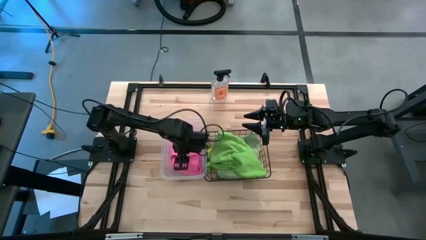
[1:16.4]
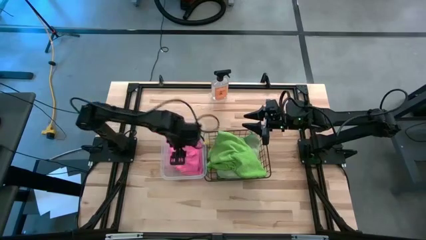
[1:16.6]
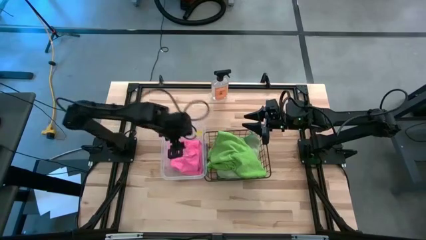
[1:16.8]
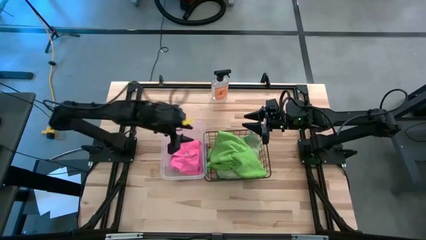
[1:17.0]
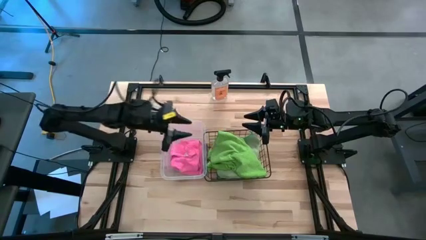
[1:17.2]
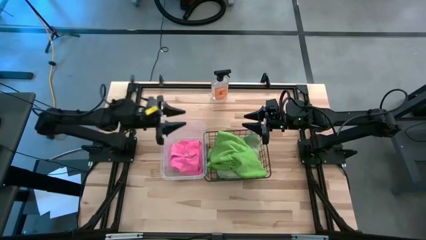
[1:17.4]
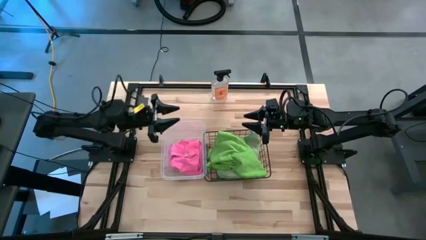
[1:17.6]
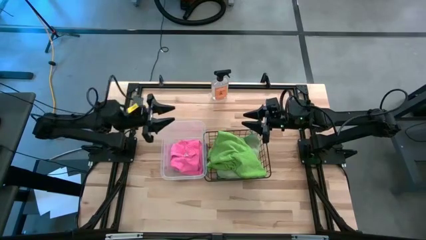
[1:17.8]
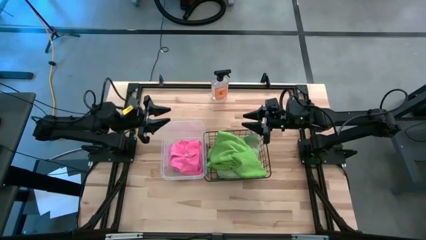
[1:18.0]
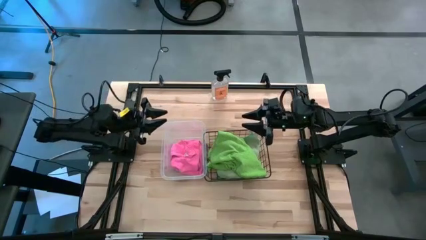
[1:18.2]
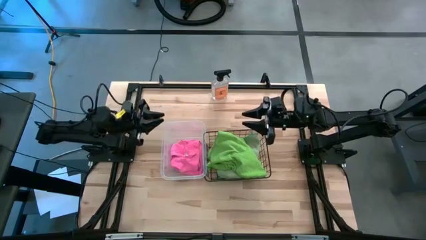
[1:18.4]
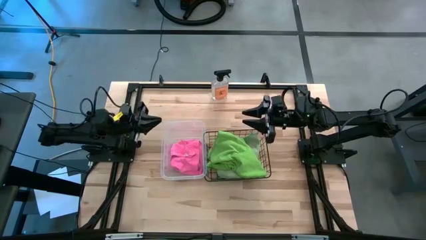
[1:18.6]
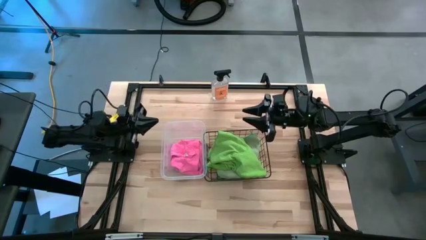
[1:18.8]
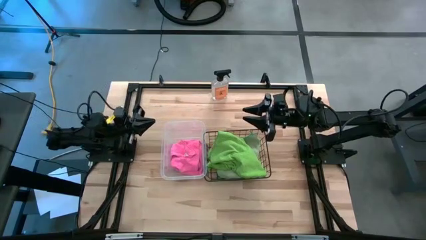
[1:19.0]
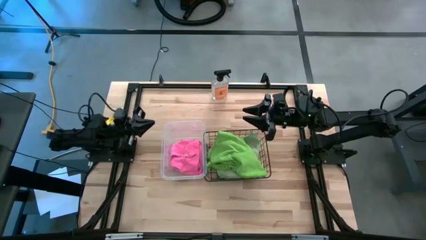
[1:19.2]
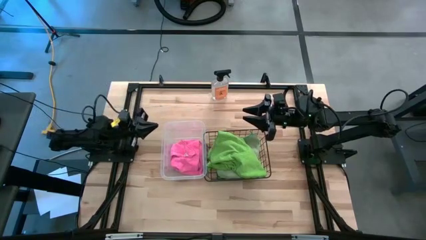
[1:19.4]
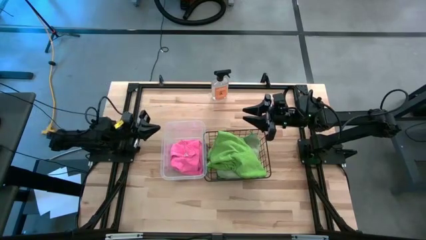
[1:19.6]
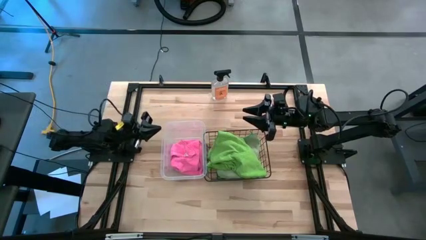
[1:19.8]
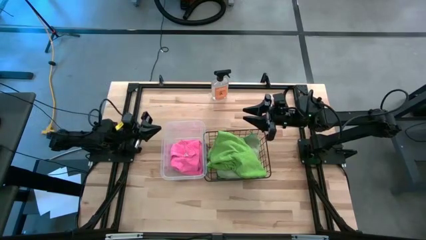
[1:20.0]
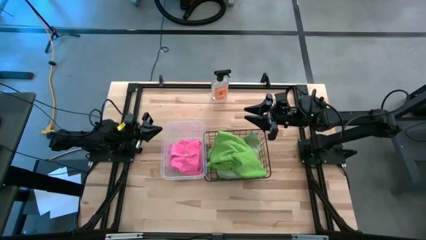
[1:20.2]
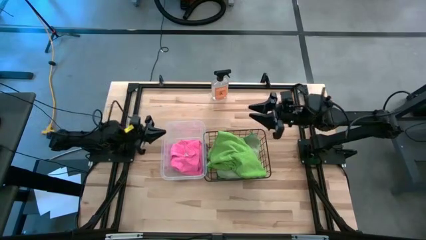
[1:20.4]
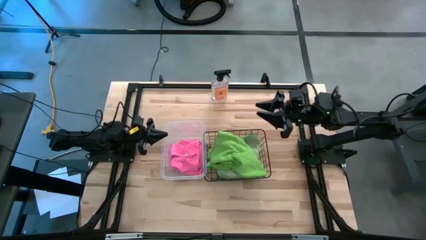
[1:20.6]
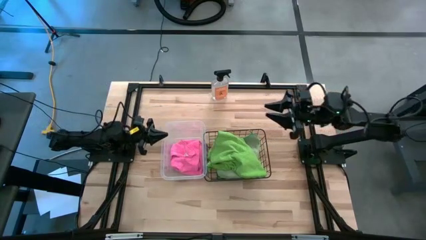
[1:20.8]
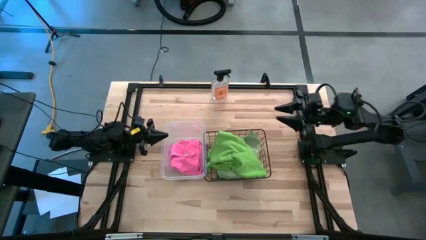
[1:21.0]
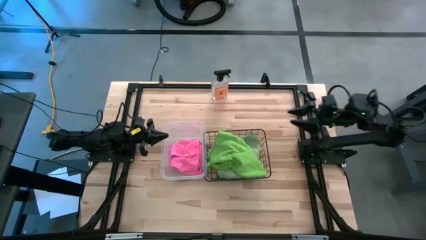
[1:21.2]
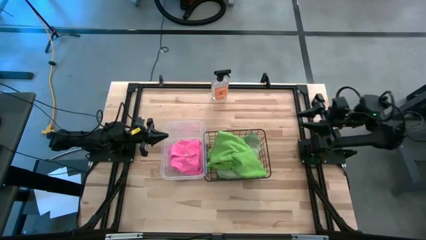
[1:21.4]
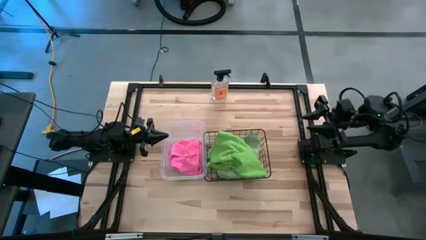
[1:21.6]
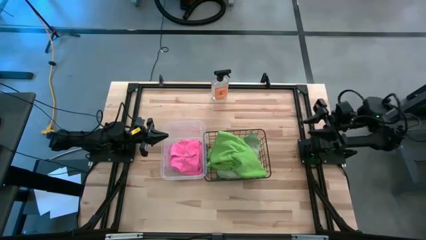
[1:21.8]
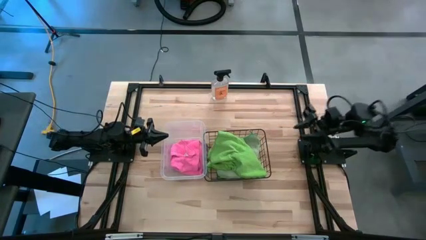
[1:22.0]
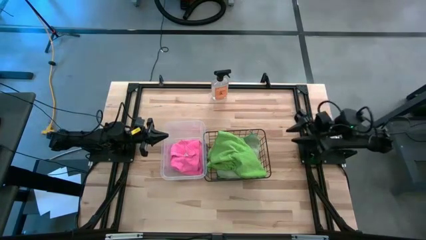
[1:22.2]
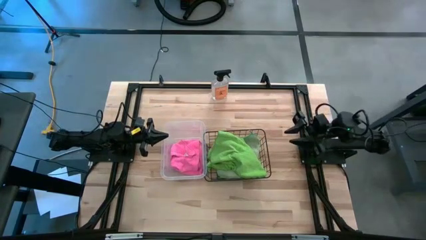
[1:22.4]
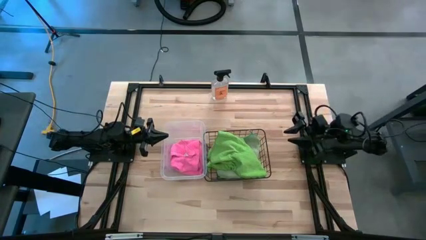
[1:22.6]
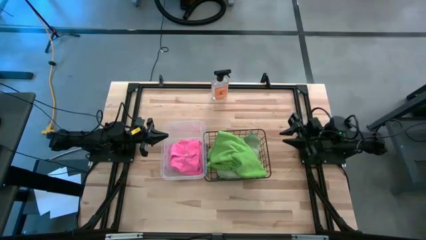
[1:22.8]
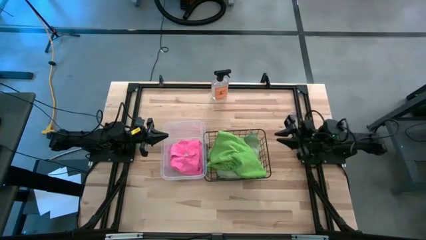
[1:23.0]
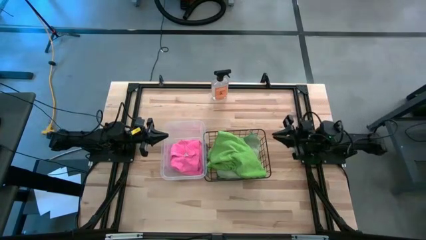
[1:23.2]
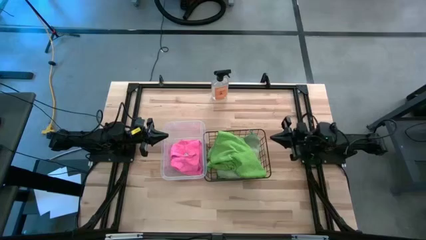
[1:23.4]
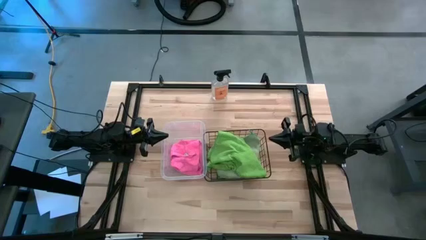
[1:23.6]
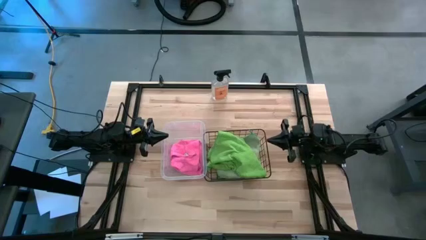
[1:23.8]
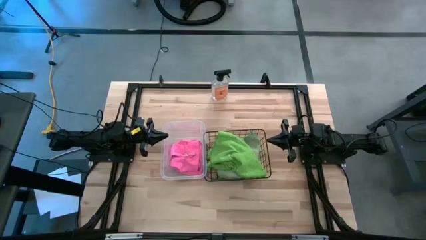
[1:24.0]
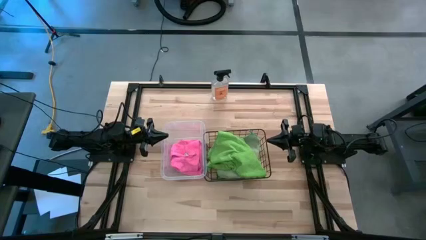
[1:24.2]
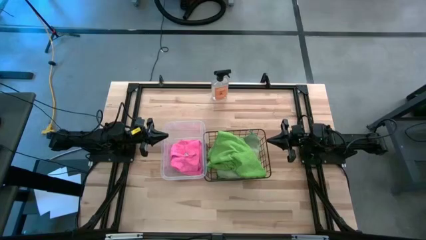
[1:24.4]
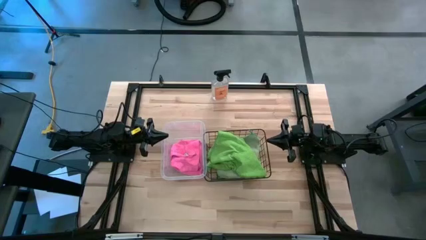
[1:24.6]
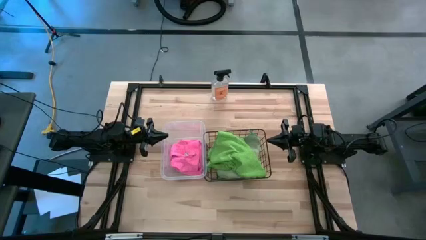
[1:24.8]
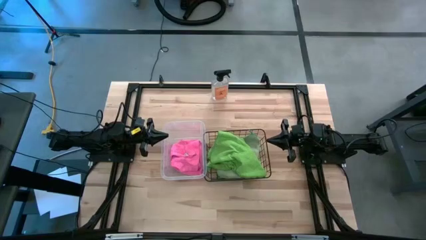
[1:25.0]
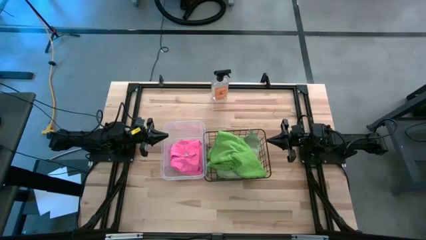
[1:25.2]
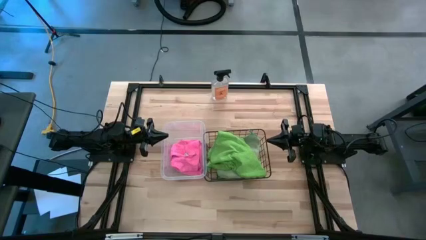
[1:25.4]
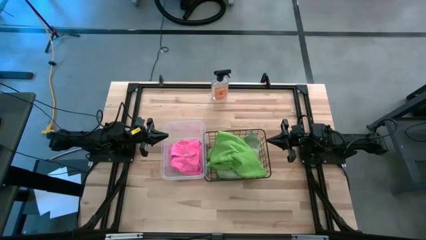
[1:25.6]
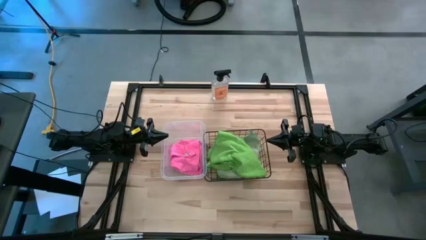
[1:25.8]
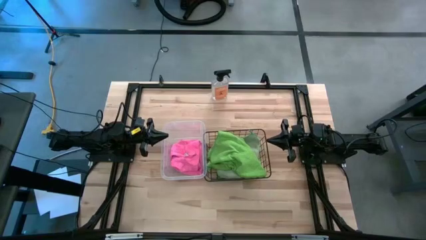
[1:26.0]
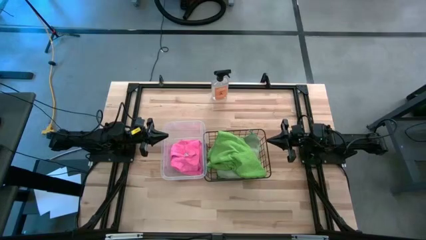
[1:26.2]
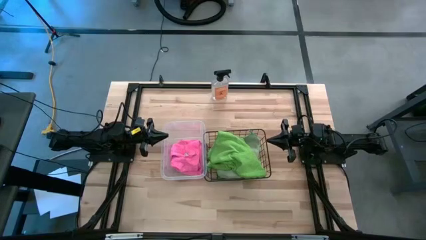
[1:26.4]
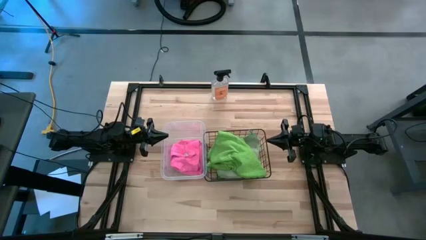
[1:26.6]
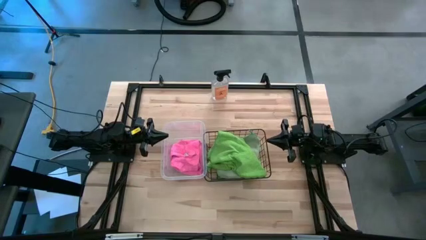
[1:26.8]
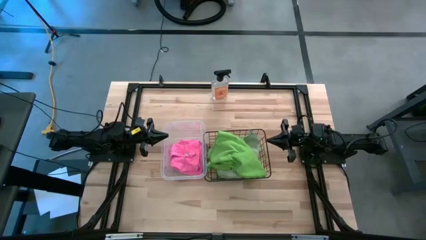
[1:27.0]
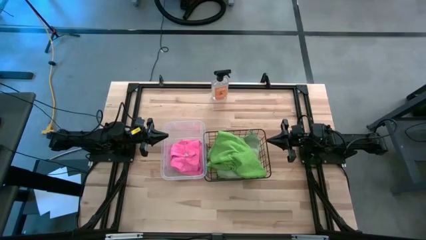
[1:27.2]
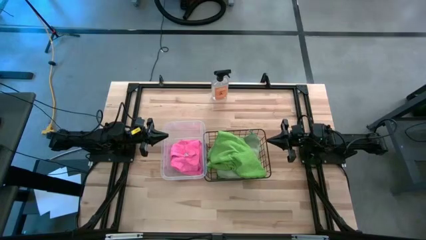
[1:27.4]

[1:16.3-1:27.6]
Task: Sort microfiber towel by color & place in baskets
Return to Home Position

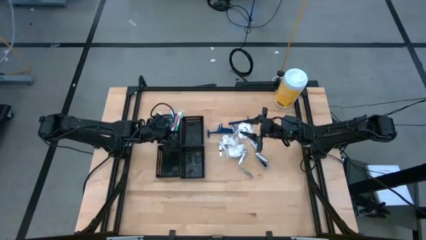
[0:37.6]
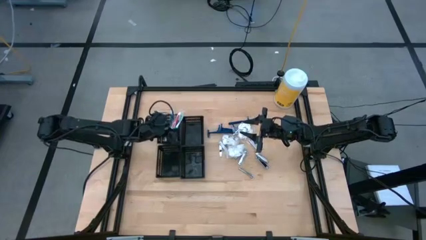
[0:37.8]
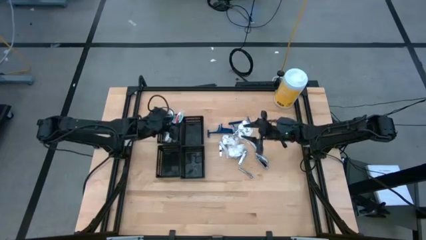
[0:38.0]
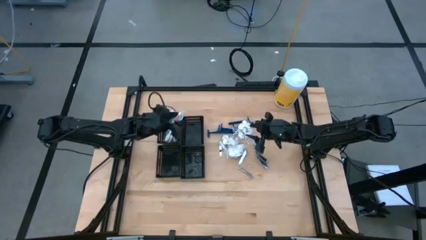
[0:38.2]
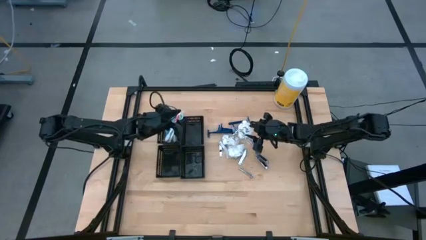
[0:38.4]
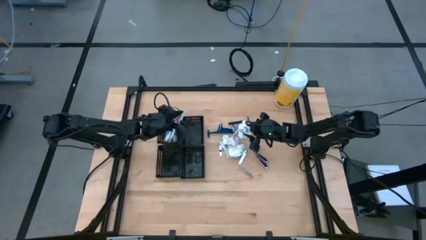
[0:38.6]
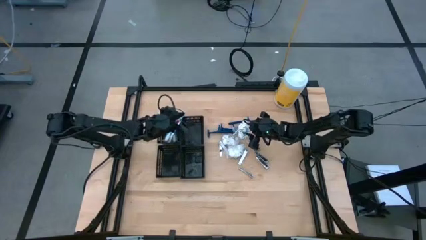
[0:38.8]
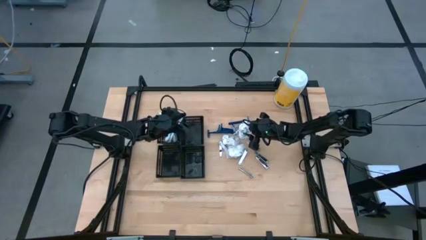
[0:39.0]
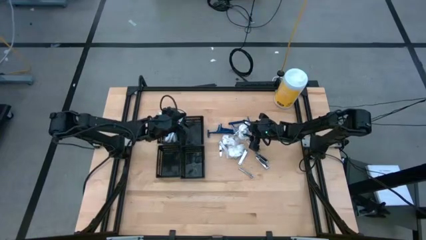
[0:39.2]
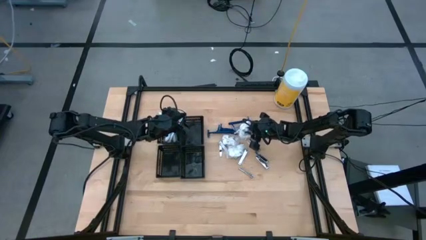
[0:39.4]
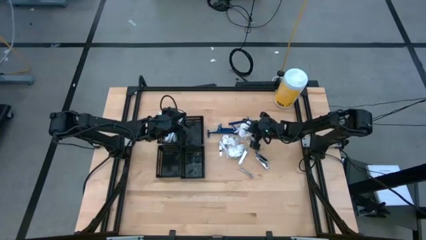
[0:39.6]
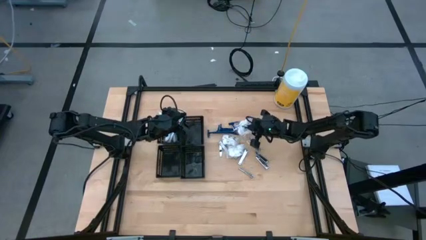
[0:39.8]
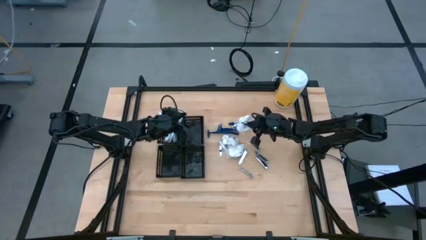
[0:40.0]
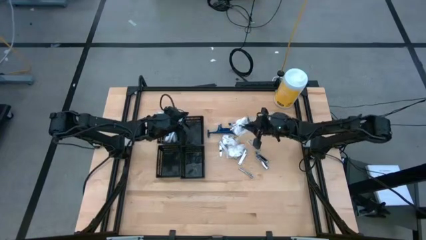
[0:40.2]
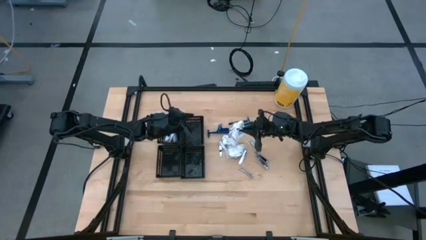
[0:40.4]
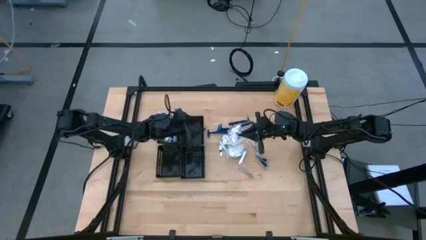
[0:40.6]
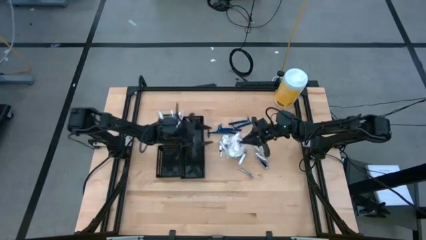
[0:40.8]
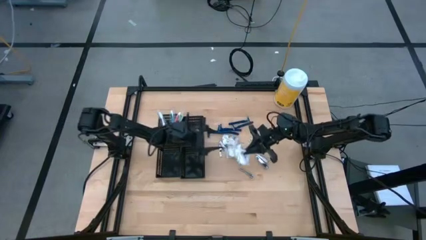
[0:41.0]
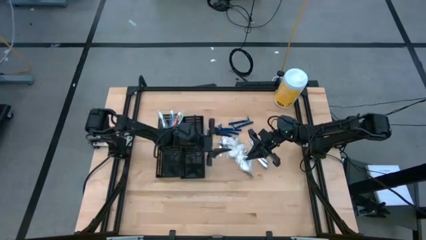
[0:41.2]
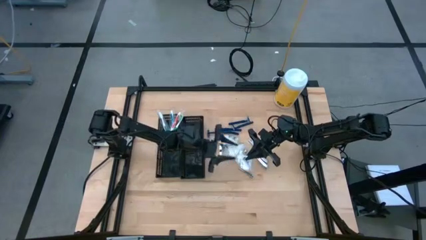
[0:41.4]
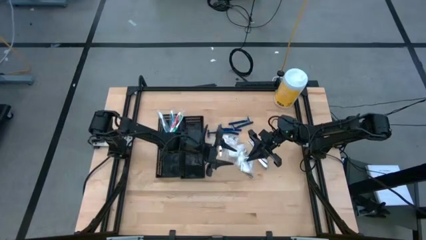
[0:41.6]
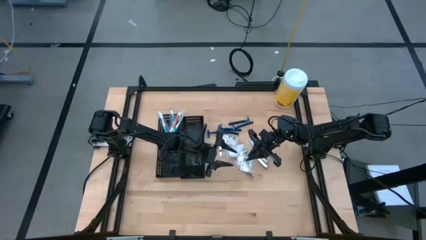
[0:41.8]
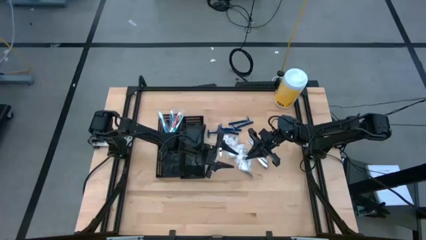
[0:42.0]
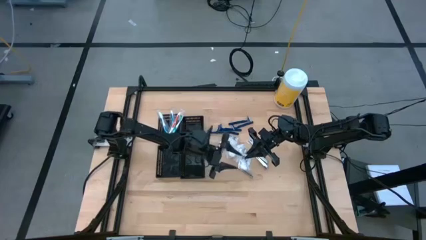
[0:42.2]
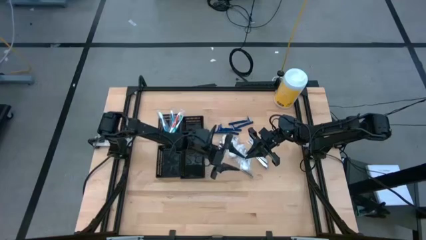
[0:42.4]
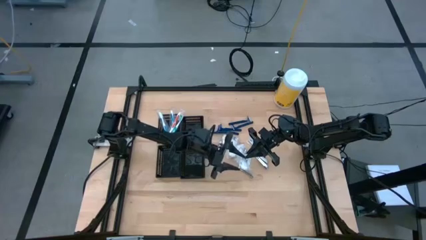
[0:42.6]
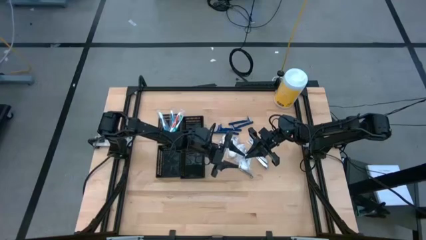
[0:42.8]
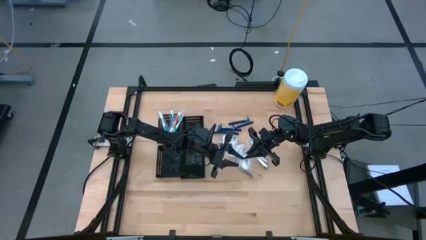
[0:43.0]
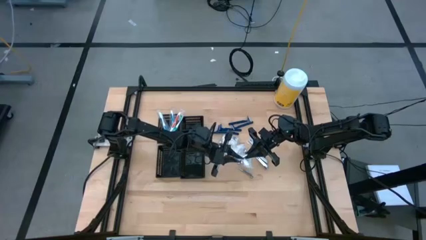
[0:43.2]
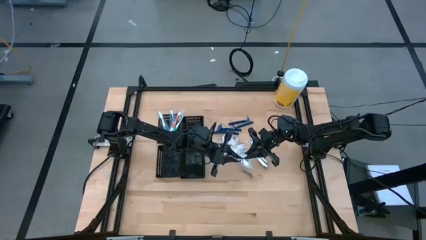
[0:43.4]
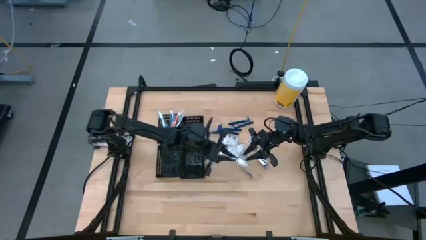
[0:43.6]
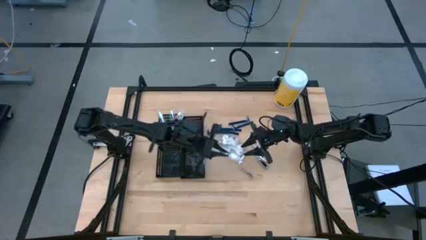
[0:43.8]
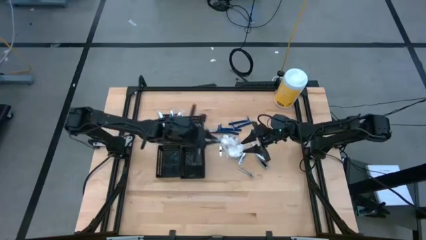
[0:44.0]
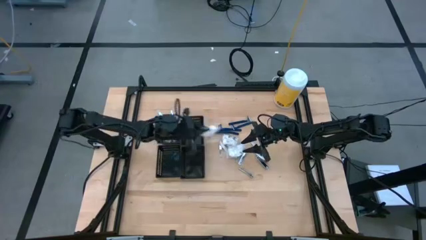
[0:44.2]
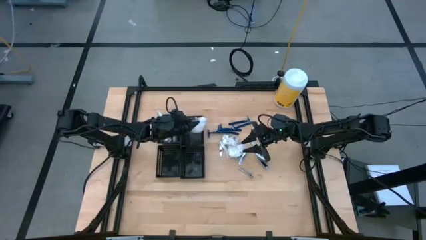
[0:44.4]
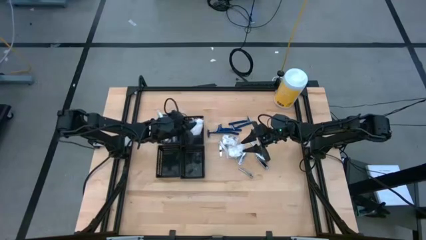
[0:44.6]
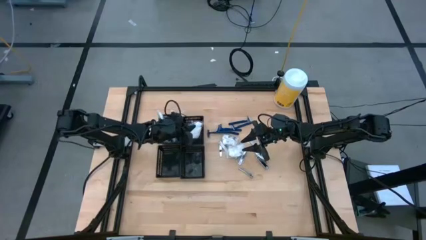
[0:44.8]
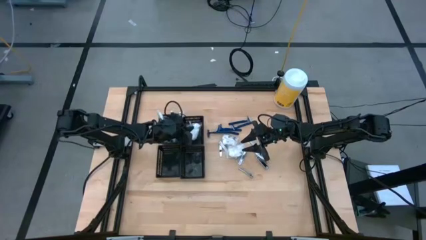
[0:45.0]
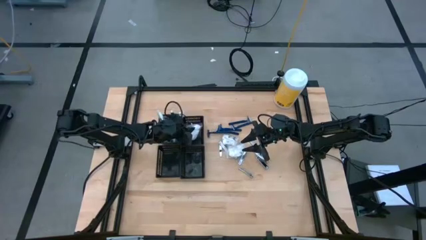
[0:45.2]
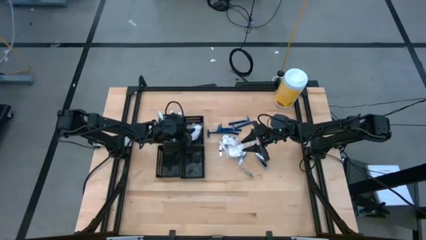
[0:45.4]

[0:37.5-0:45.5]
Task: Pick & Place Travel size toiletries
Put the cotton pack into the top right black bin
